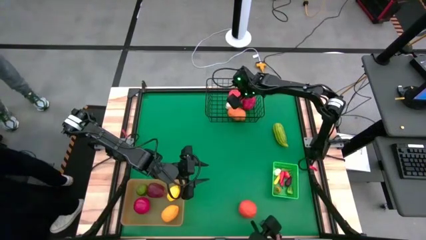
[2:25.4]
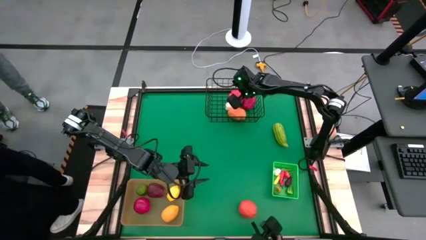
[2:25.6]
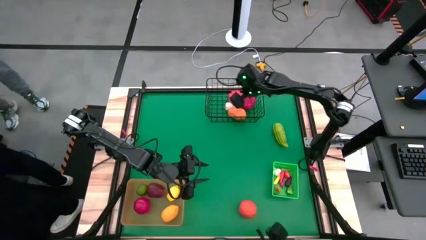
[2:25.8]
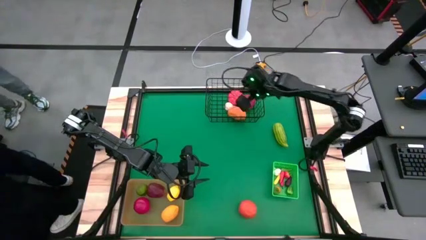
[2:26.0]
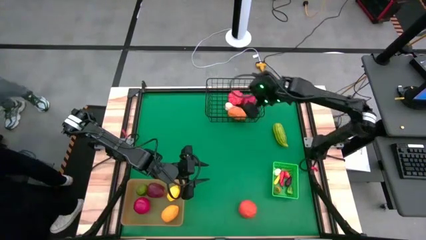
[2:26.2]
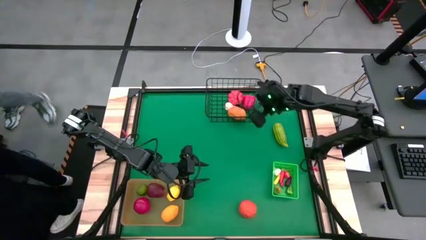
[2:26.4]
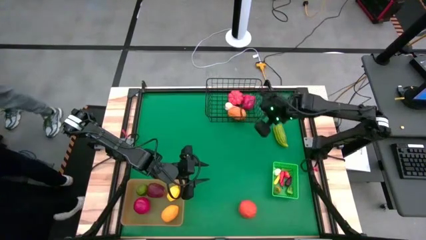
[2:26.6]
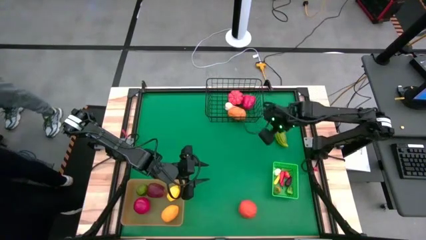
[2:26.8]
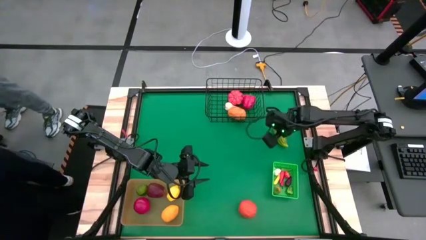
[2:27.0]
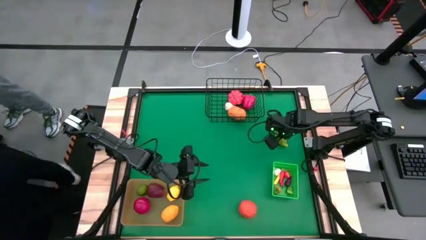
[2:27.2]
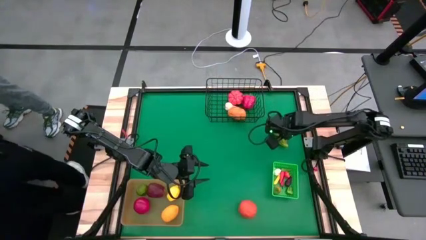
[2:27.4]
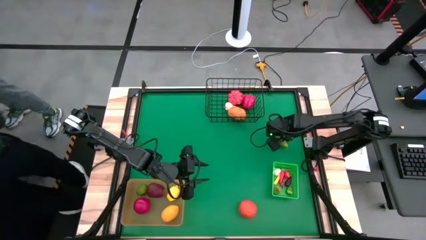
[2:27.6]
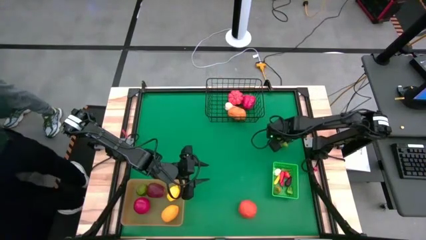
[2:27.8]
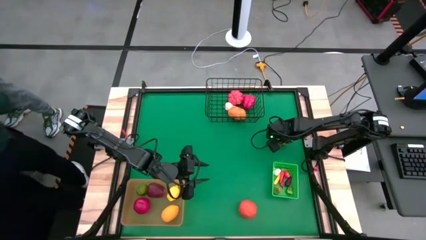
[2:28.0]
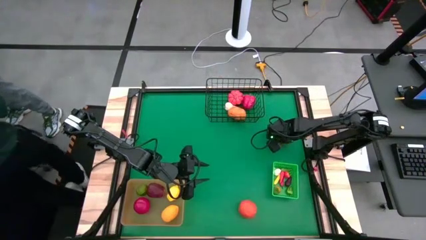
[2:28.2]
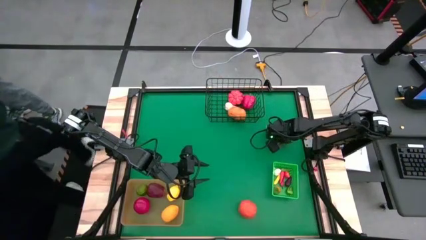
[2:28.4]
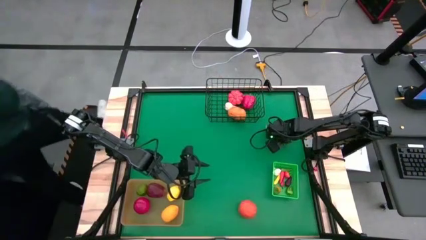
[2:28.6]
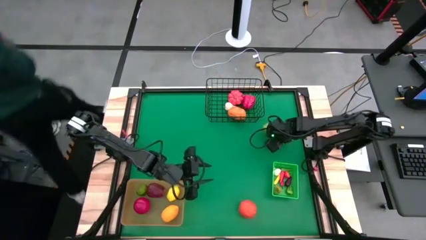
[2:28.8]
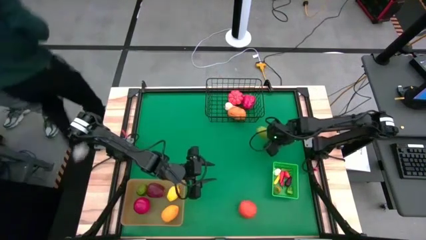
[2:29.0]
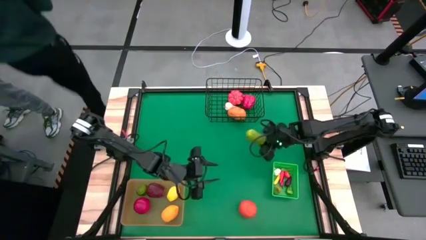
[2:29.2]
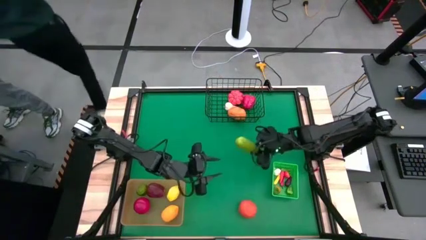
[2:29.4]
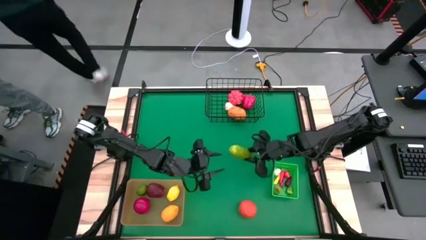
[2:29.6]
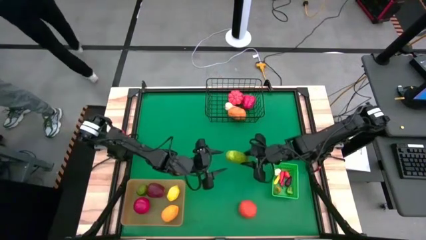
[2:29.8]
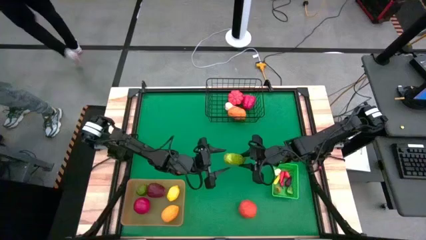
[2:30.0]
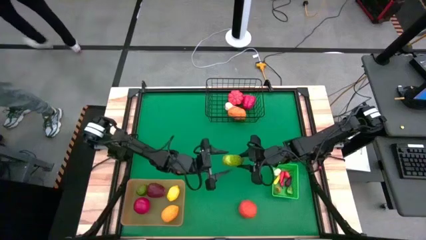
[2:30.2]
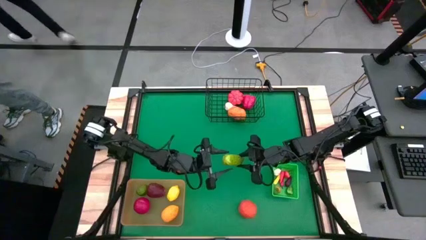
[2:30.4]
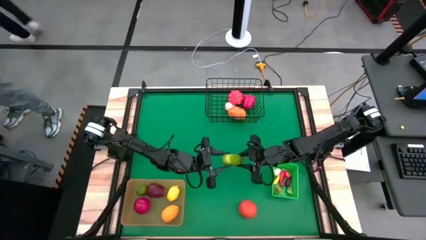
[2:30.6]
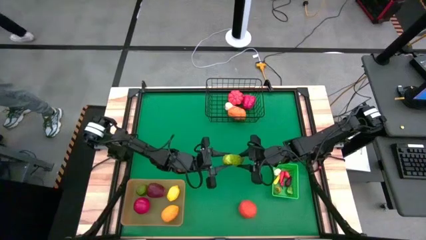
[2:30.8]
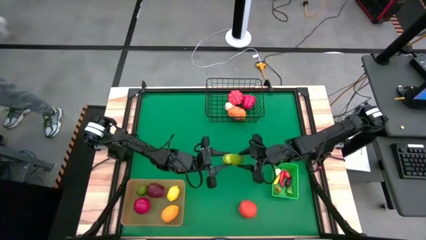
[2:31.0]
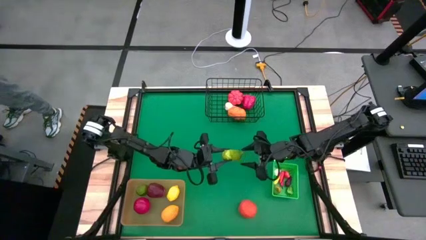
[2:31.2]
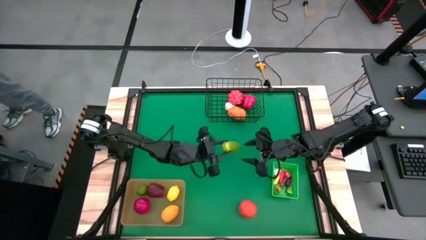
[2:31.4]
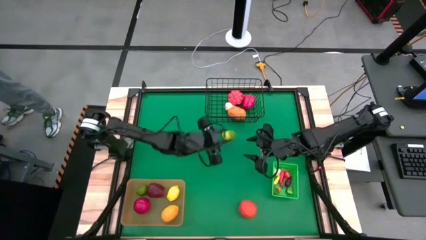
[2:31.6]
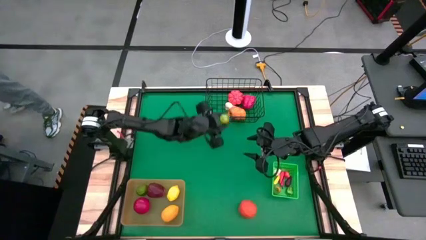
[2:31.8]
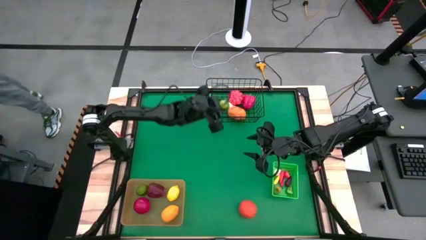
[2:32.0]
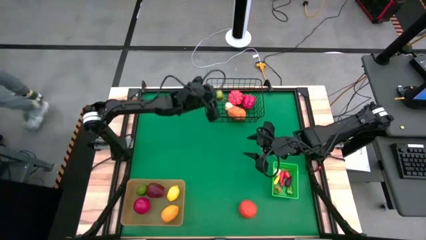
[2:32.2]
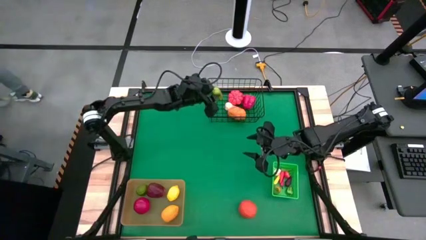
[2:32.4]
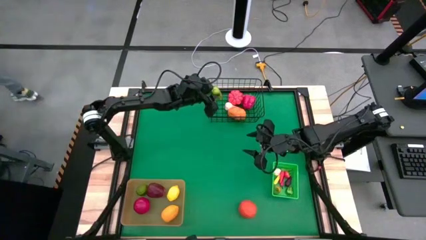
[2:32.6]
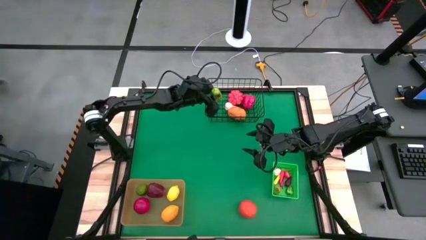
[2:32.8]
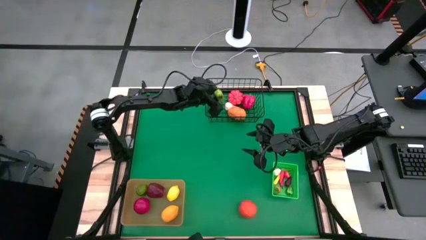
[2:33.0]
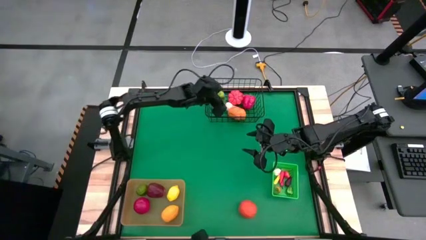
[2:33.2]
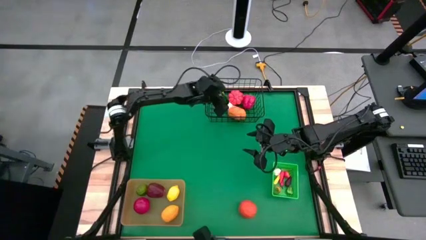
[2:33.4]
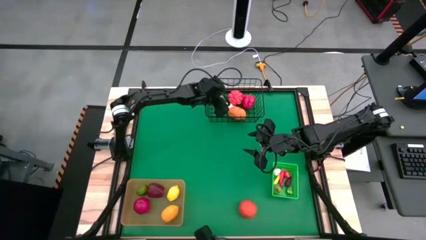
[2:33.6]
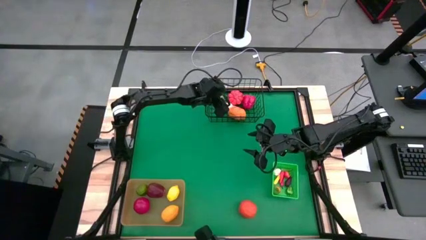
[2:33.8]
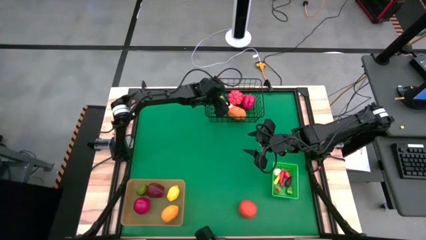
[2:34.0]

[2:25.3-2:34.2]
Task: Sort produce into baskets
Put the green bitter gourd into the black basket

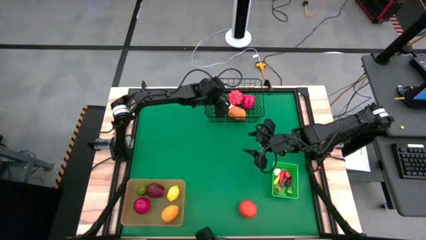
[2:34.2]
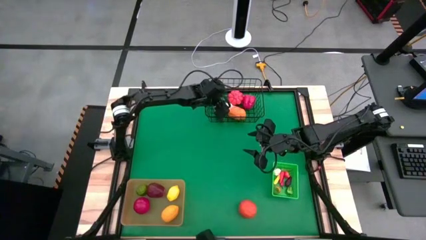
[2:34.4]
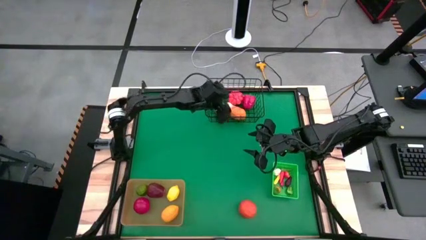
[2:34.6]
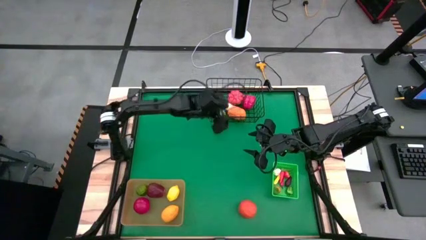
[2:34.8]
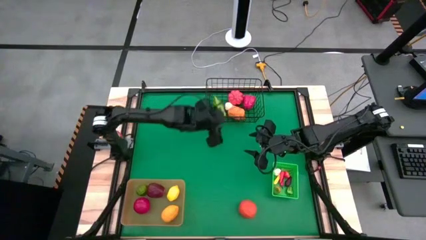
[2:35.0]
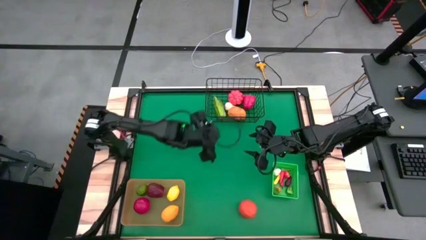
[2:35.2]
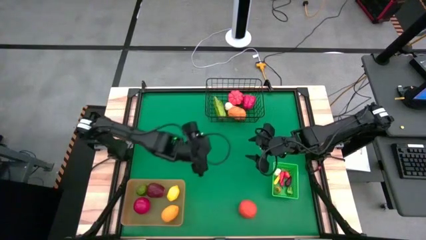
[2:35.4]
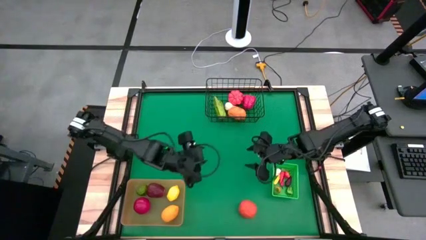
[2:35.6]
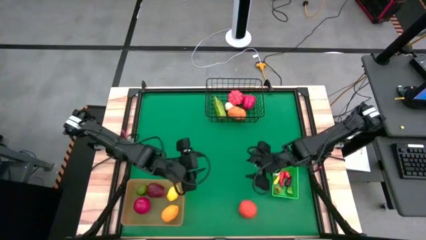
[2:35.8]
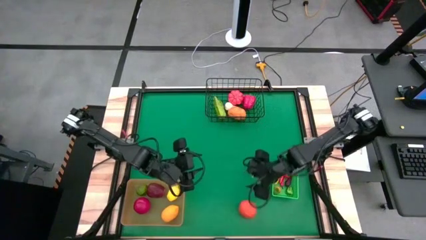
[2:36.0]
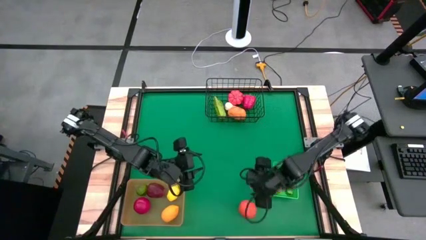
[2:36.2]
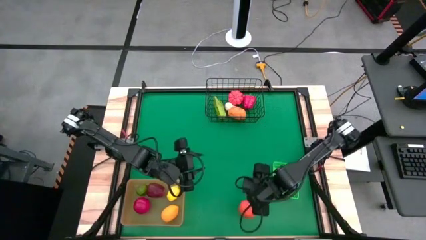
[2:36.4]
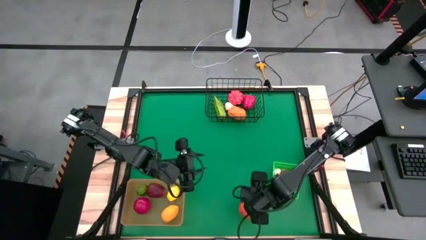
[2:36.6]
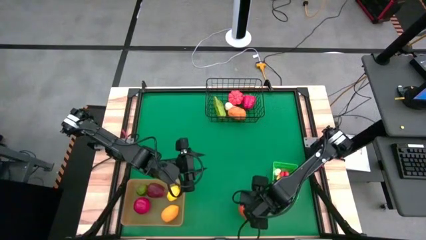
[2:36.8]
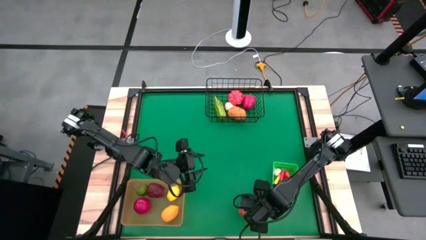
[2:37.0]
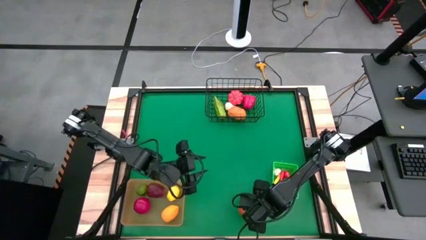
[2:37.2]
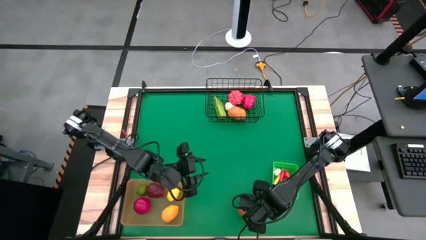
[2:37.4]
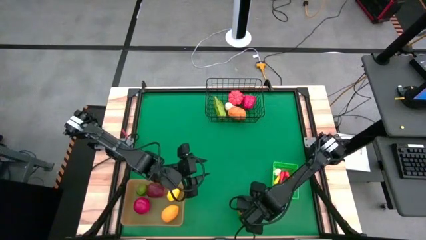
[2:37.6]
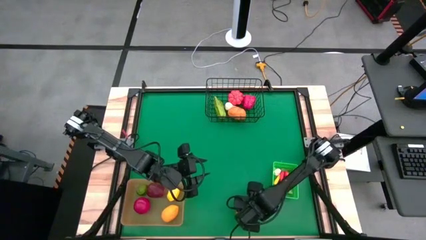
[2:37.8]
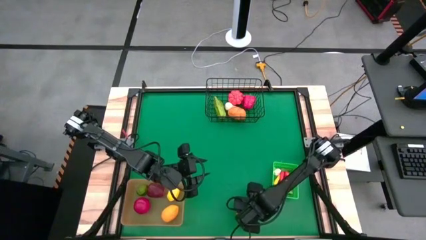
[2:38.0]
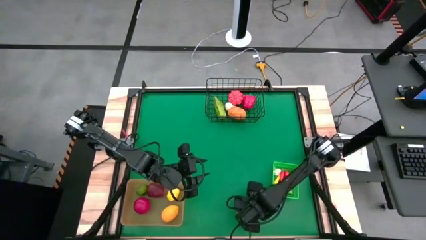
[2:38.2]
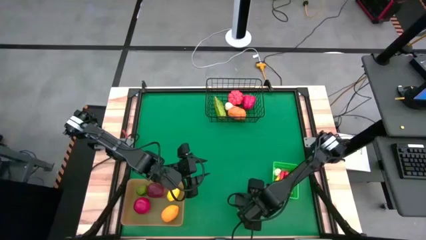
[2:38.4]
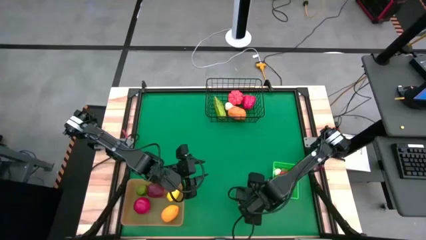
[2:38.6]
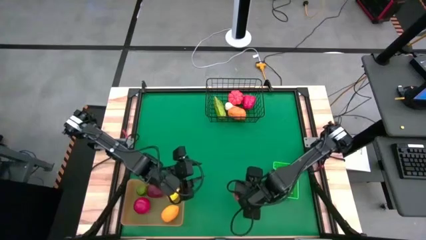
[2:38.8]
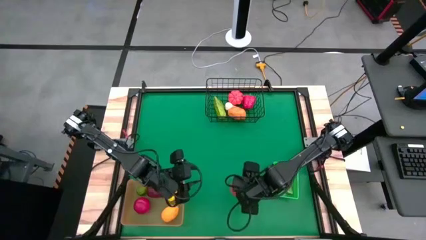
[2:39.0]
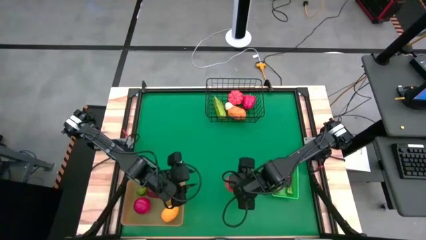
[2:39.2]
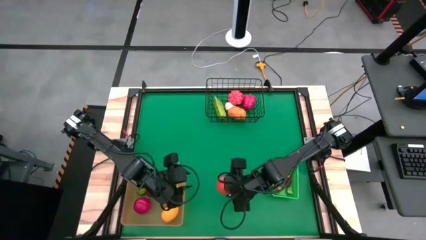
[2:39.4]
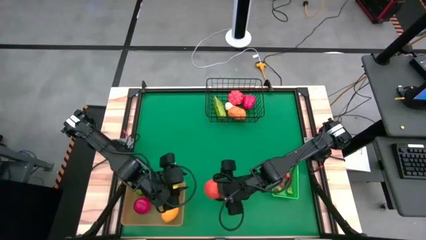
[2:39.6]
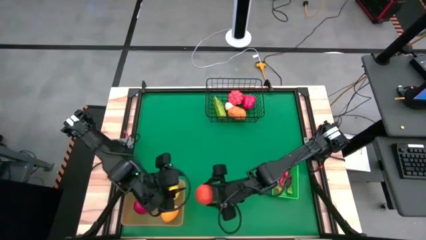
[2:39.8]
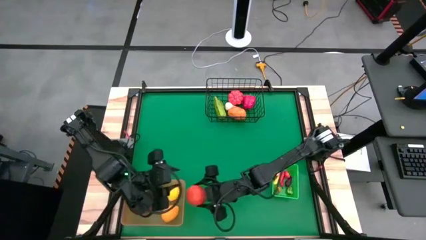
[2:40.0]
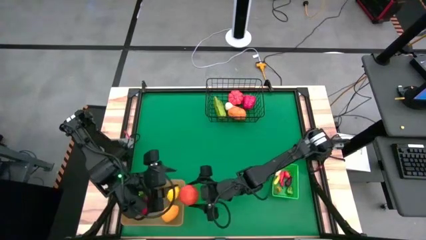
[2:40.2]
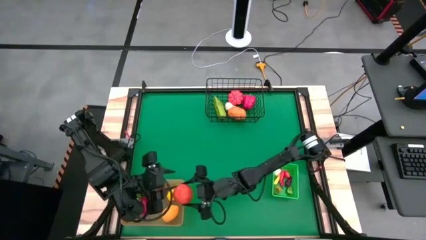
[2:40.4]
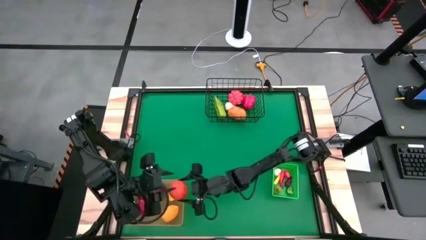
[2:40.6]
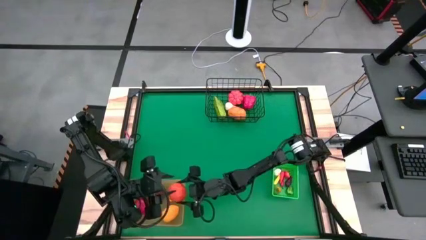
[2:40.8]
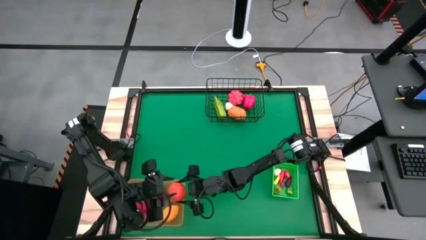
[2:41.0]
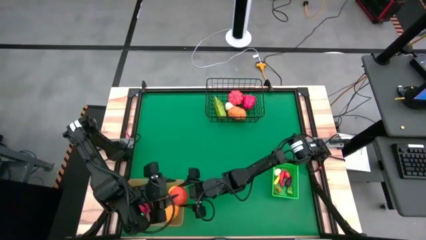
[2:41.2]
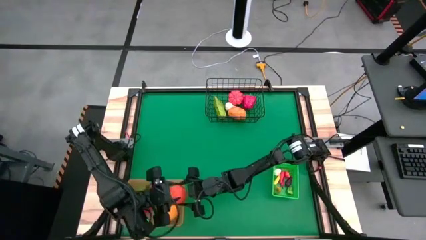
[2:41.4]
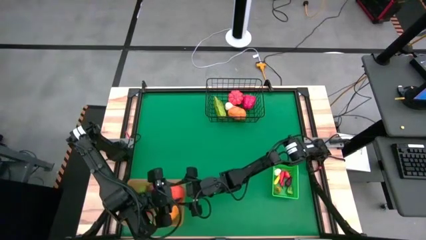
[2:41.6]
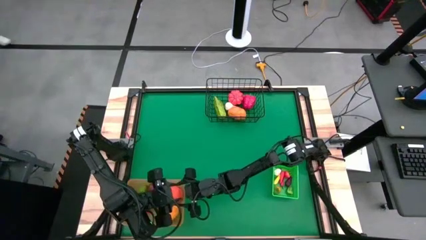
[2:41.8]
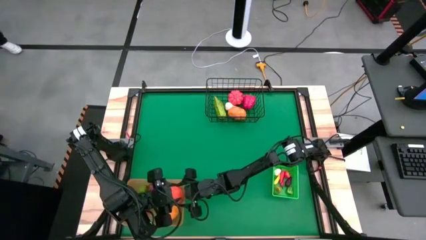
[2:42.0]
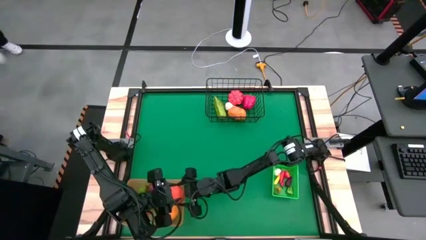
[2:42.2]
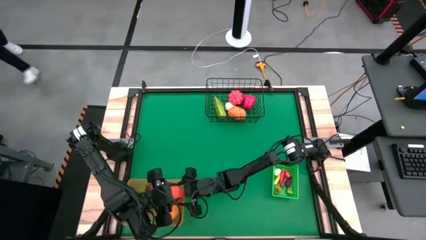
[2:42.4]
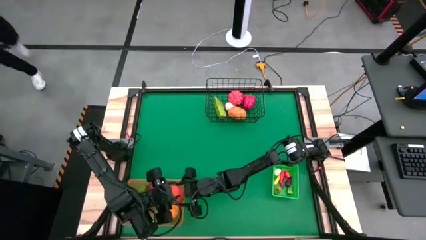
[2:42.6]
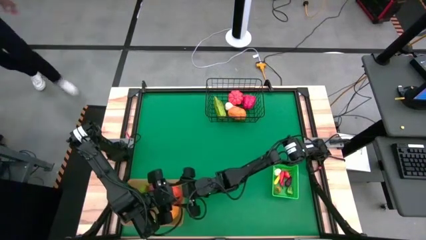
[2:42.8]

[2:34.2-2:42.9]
Put the orange into the orange bin
